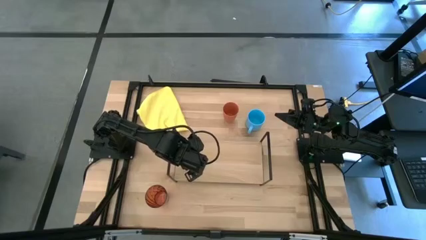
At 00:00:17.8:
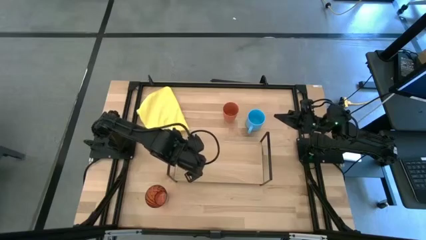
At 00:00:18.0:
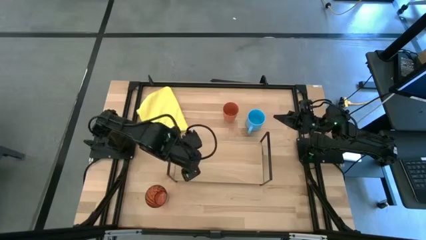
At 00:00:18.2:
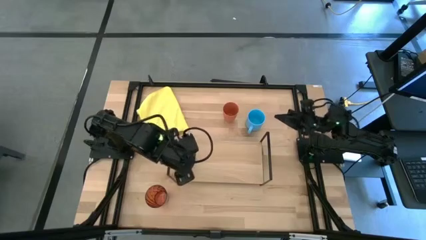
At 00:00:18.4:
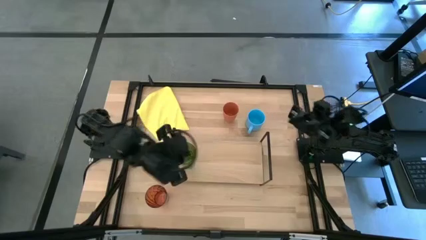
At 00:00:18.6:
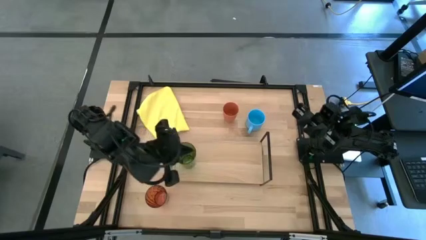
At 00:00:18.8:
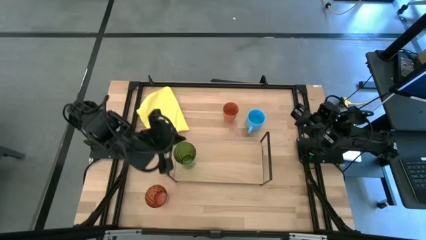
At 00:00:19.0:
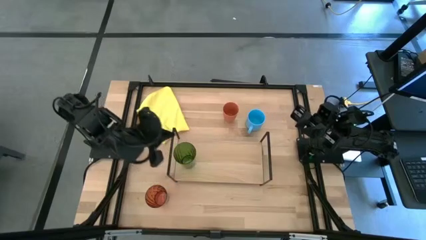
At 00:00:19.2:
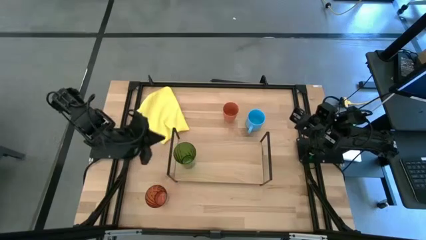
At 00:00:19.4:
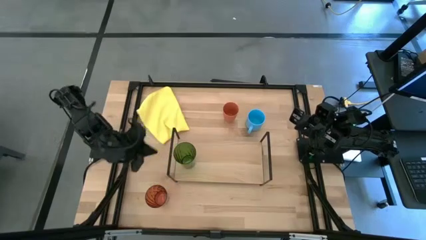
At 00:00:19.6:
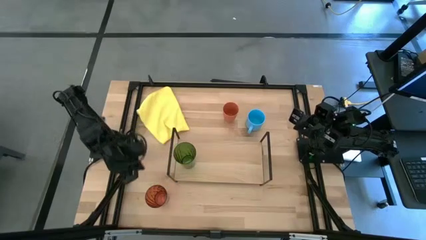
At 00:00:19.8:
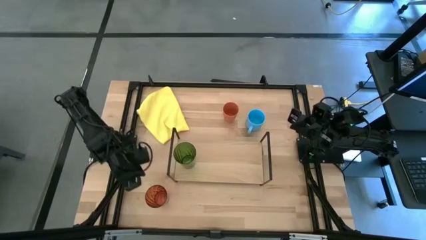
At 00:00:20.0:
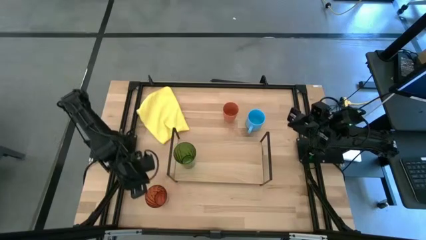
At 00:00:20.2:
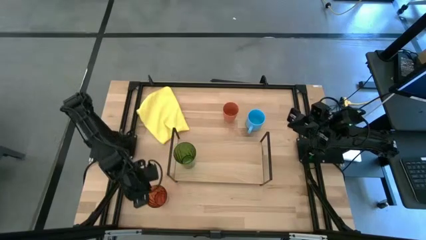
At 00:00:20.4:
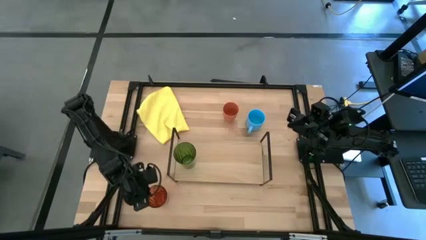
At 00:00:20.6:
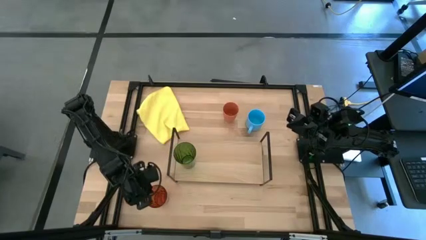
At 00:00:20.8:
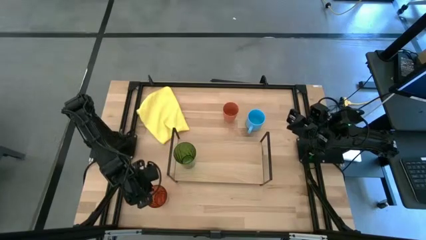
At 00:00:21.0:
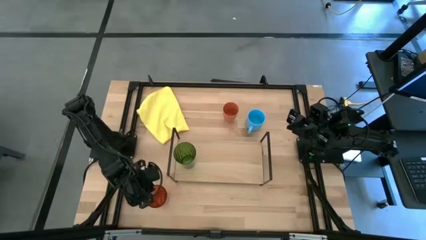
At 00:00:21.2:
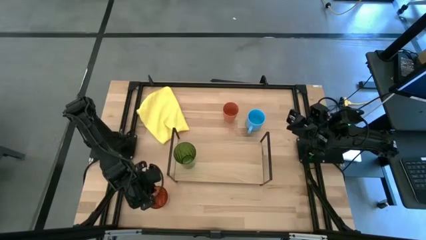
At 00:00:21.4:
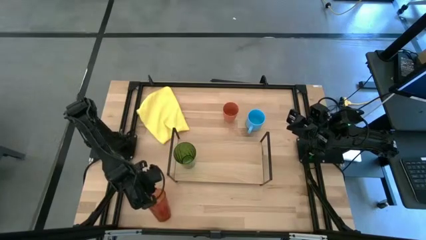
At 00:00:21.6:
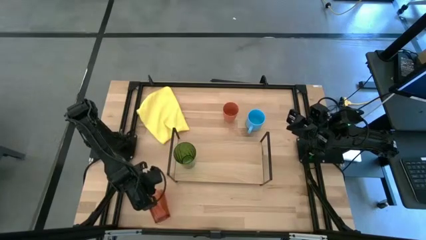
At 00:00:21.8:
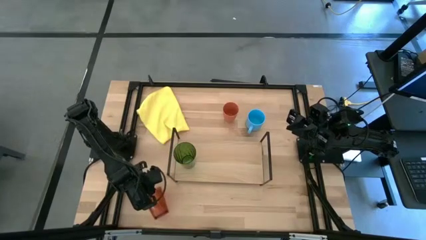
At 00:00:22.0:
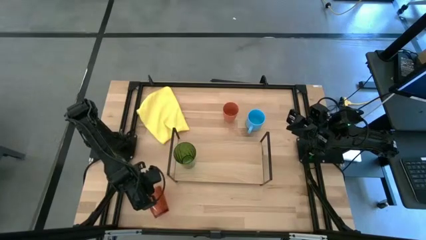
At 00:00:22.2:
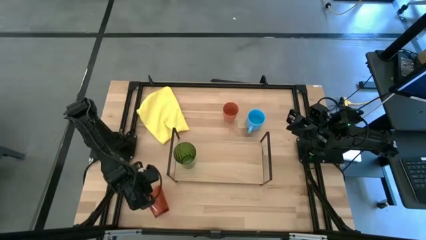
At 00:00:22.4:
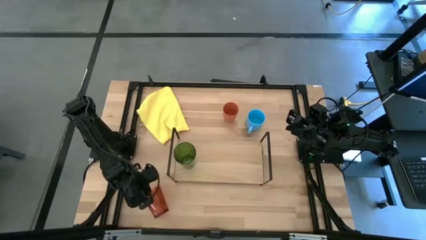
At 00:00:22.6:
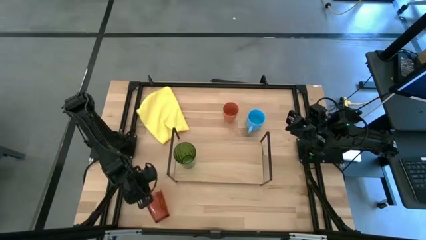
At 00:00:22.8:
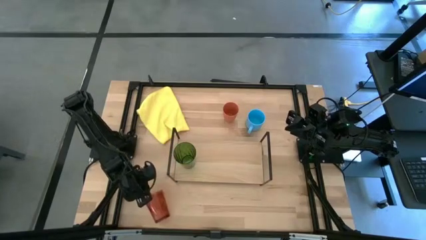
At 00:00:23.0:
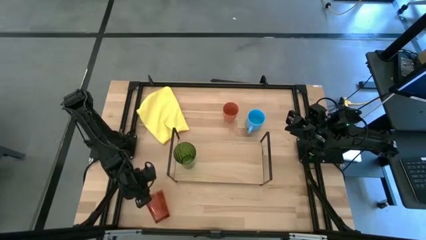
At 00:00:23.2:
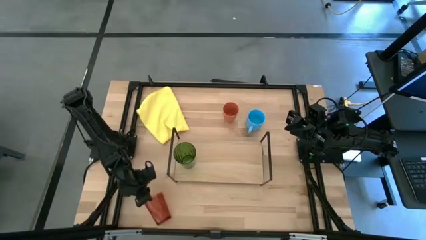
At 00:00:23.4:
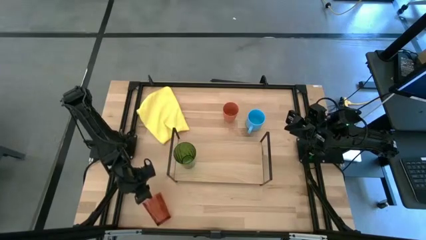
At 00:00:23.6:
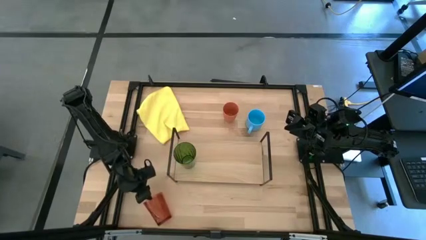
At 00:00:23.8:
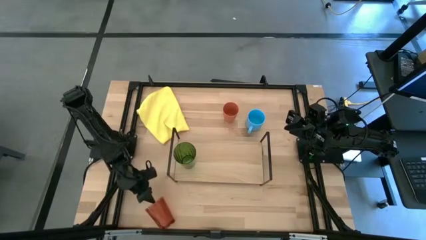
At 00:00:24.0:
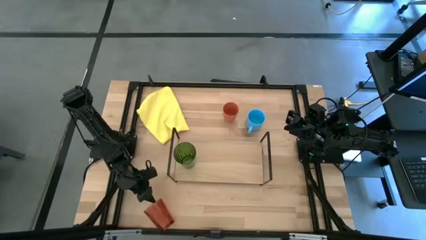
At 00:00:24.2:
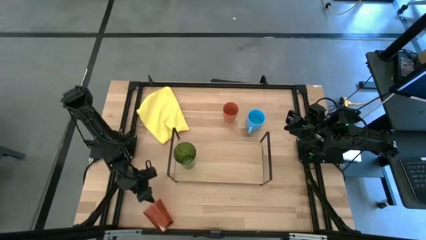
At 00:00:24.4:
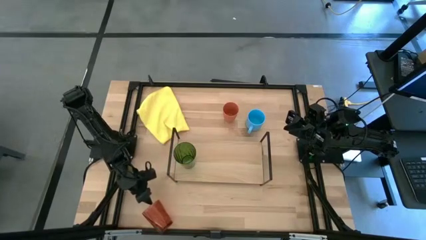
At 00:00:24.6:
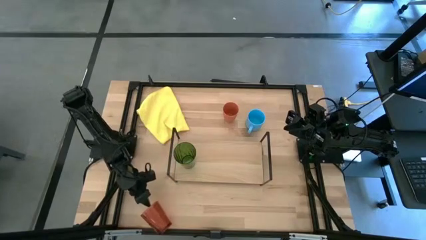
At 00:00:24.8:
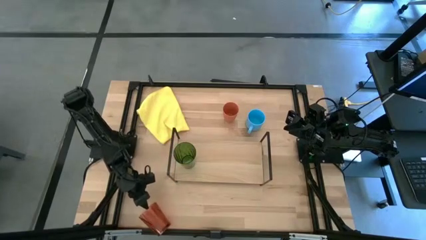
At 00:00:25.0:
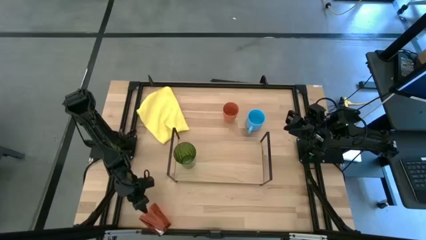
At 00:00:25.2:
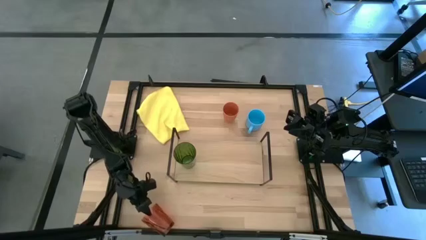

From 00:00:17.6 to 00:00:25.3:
Task: Stack small to large cups/mugs on shelf
Put the red cup on the shelf

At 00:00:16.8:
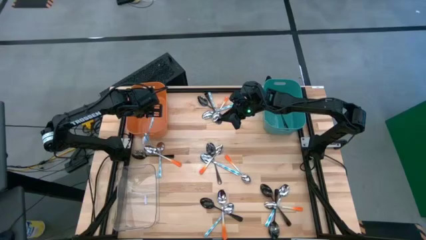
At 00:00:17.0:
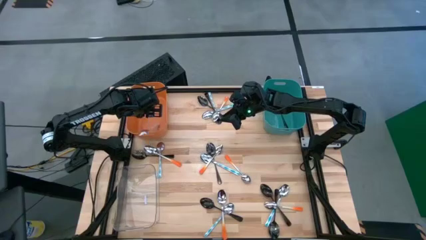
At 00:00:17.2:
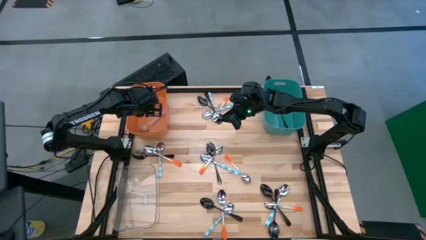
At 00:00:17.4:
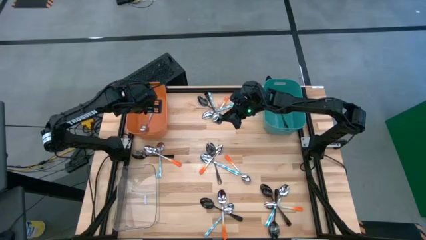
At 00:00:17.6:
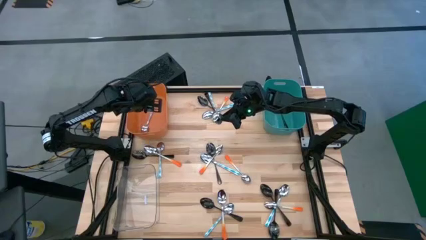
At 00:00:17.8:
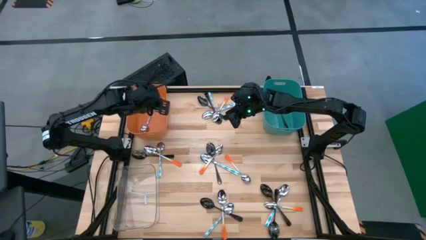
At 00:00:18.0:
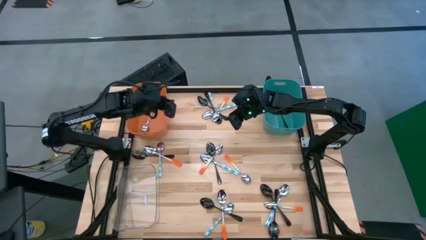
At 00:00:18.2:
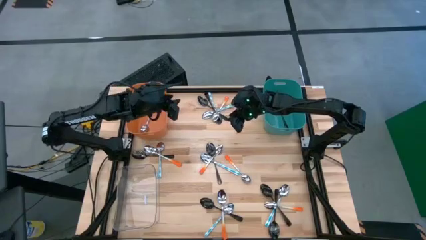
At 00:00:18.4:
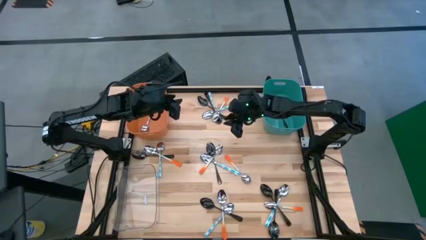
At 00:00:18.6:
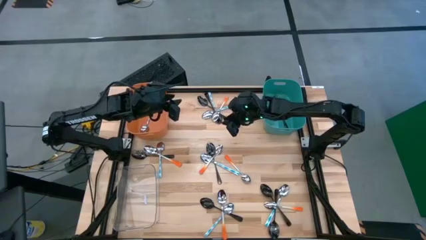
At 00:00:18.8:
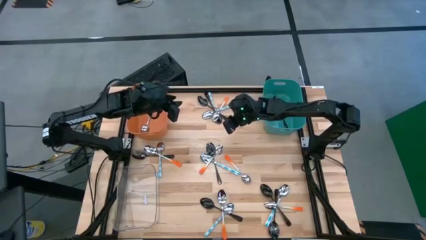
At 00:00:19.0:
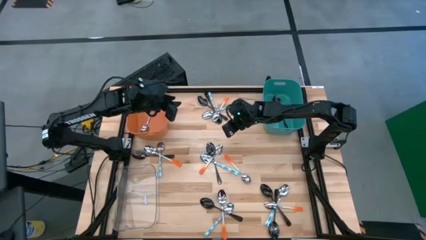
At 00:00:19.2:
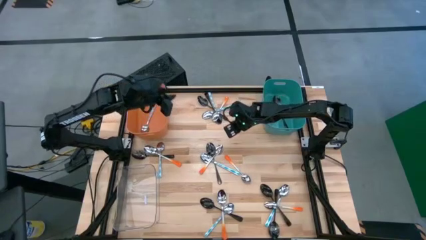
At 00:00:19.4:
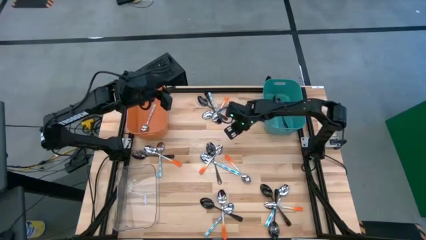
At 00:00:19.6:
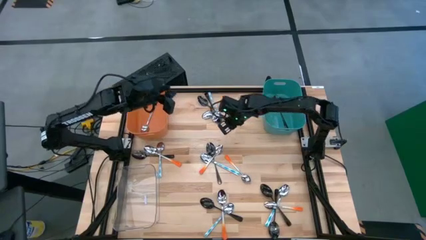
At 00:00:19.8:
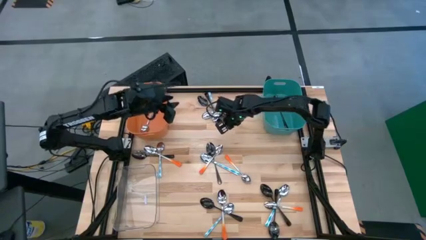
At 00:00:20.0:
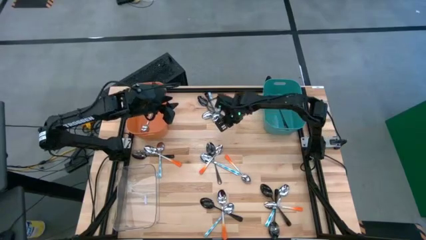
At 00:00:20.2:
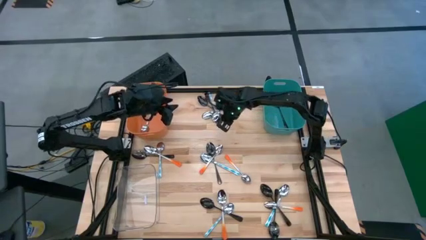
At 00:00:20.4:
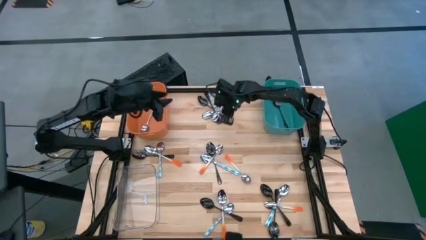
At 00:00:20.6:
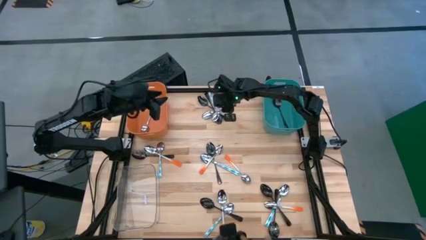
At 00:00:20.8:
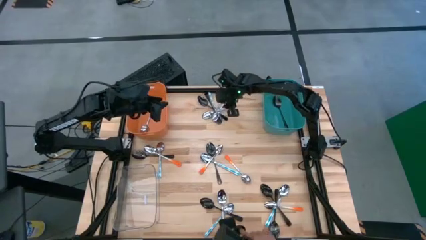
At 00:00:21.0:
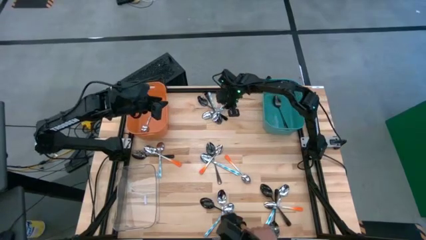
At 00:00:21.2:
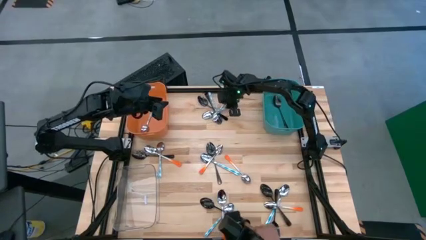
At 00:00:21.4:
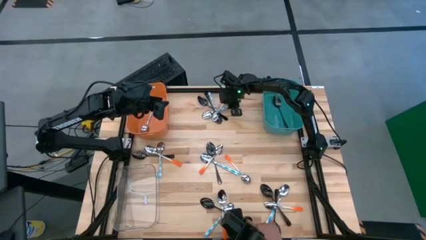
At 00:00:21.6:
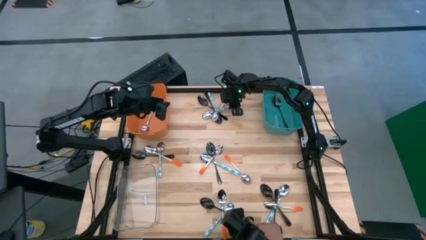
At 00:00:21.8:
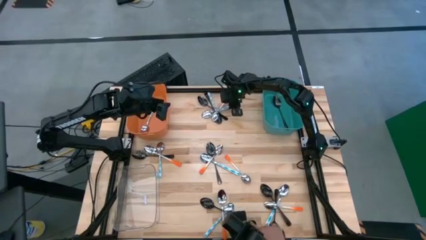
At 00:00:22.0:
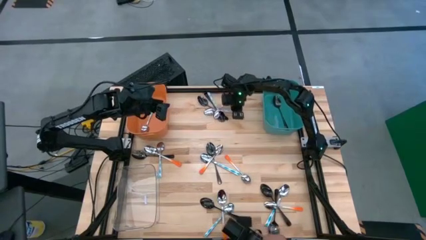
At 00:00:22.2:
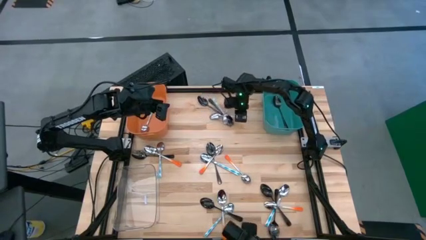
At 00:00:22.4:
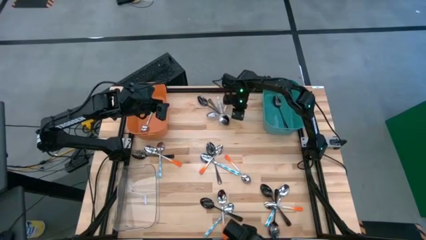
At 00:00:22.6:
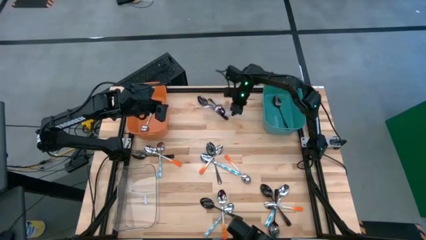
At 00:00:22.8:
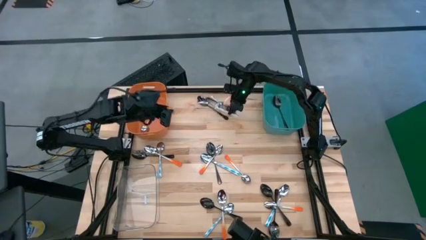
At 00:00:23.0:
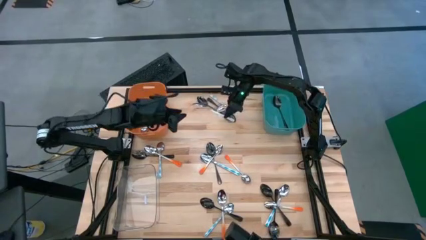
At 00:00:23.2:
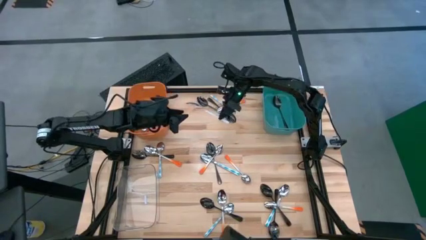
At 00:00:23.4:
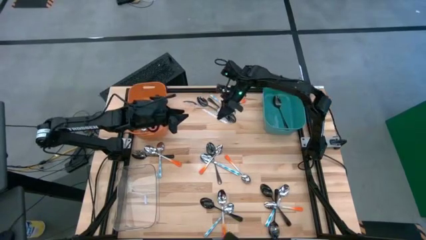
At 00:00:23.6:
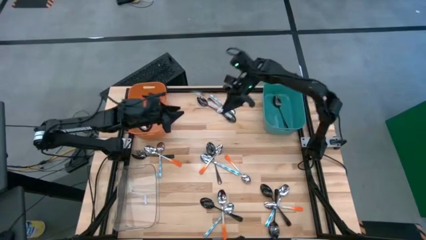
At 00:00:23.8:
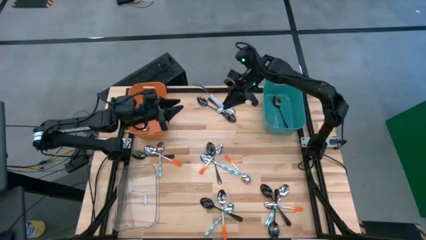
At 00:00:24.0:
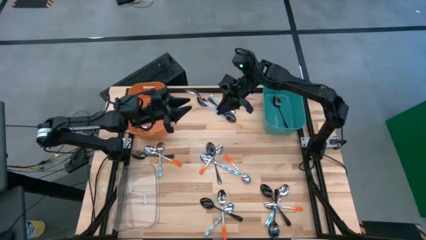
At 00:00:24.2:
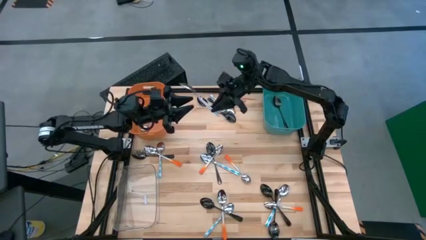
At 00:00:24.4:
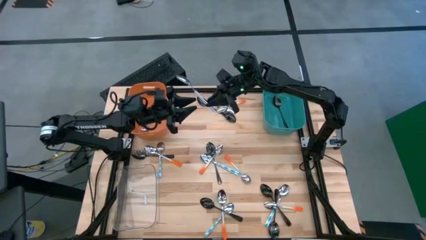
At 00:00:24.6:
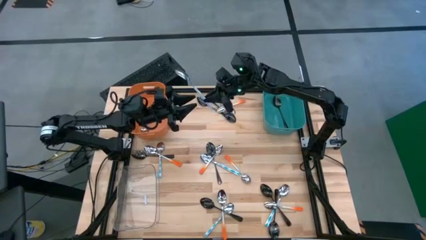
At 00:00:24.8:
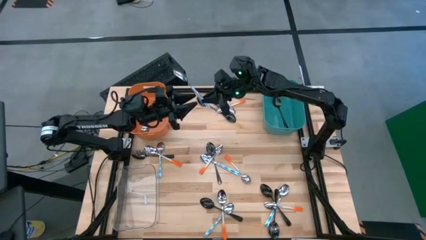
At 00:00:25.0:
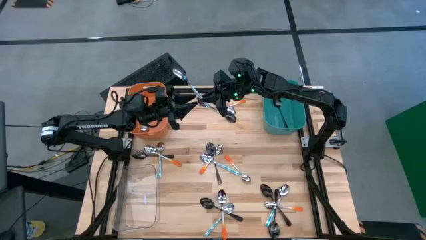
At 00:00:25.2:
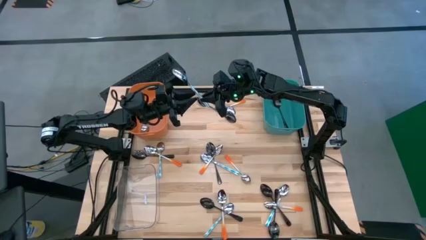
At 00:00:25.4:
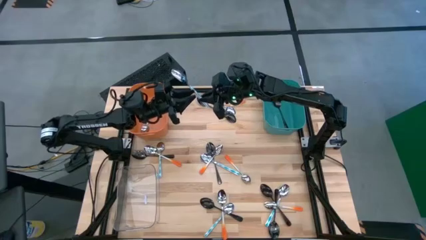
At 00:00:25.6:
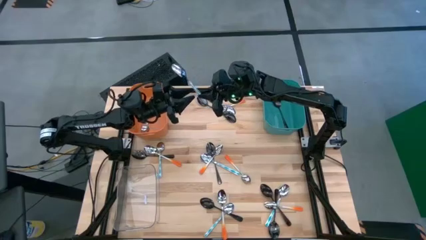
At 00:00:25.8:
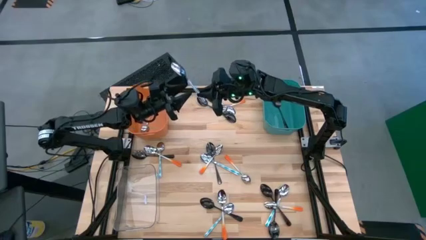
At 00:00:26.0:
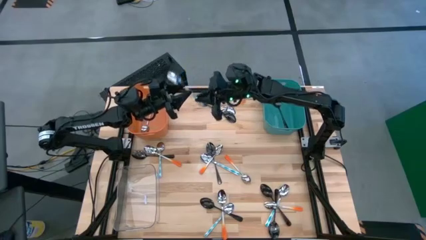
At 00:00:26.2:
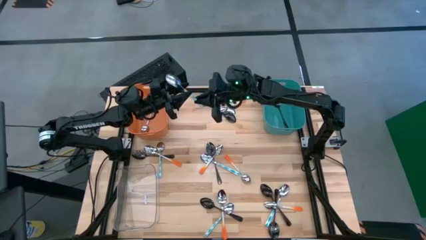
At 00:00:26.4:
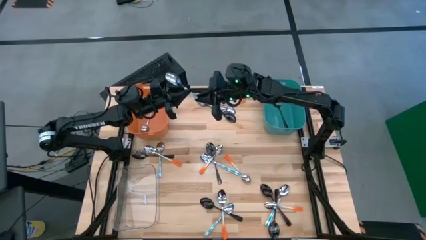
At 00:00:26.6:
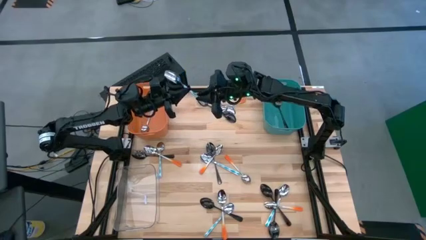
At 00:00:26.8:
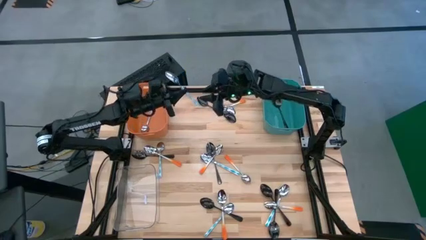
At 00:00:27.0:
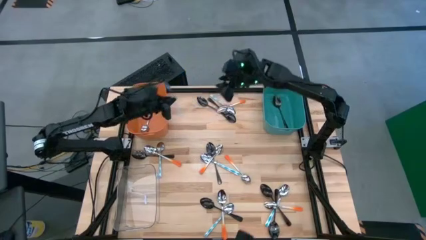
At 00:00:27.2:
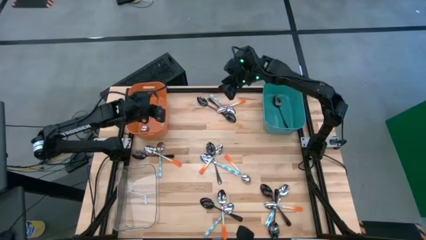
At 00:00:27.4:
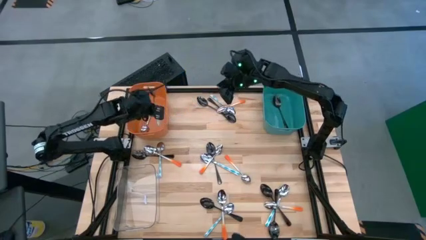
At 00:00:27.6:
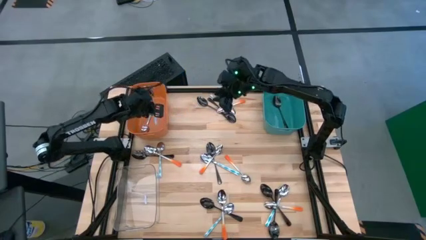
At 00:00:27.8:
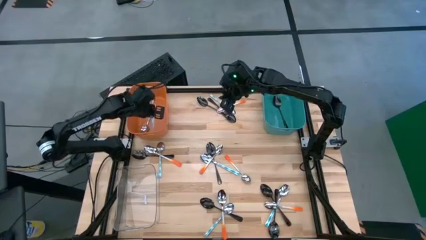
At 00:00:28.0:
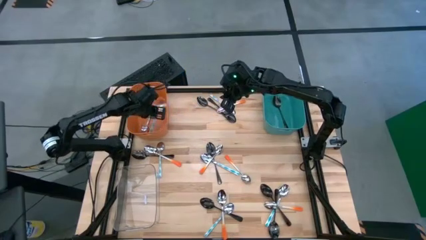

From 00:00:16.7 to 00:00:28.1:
Task: Sort silverware by color (type)
Put the white blue spoon into the orange bin
